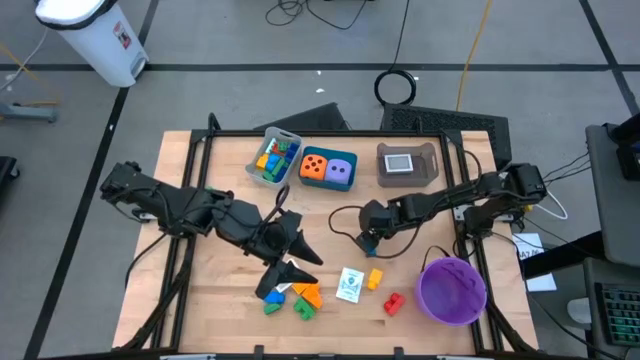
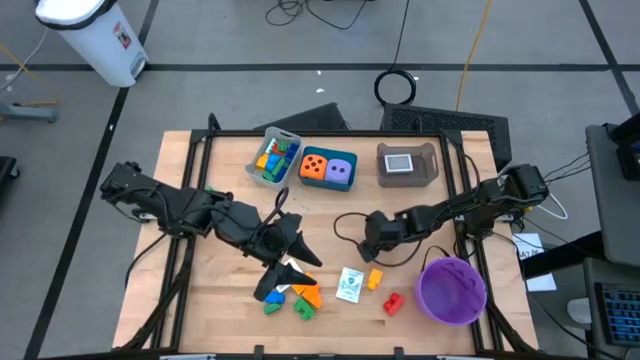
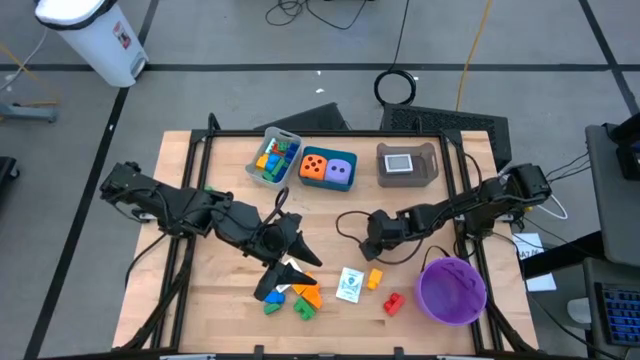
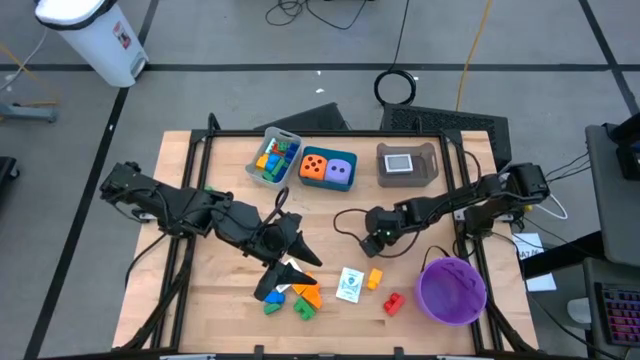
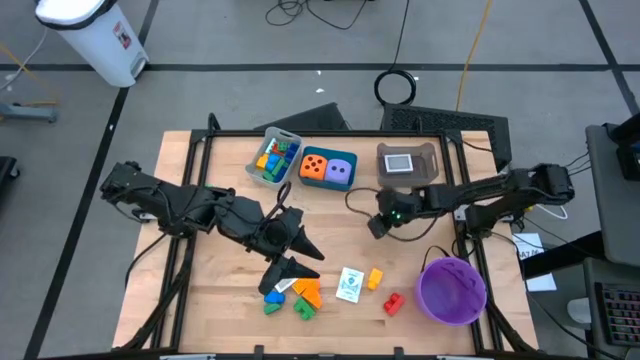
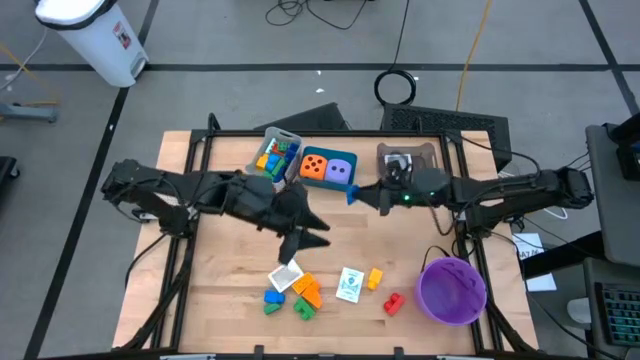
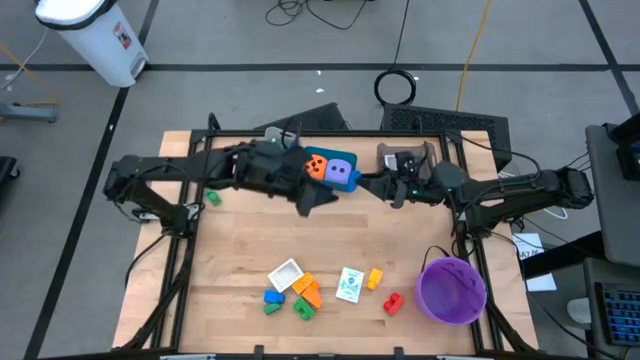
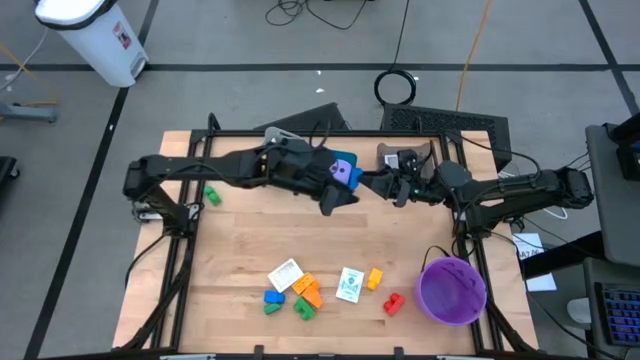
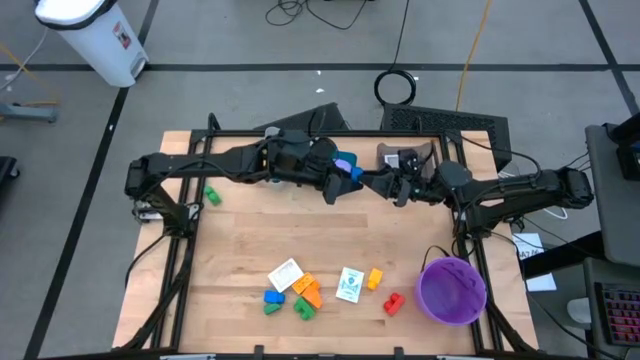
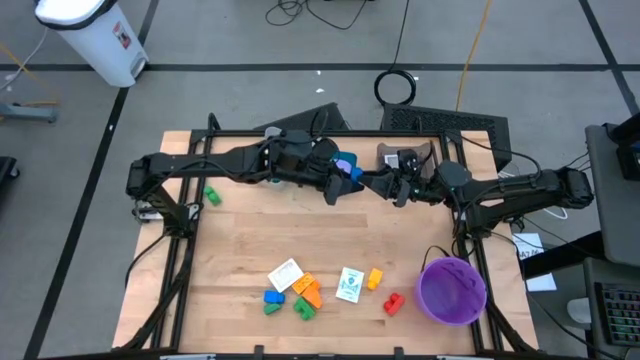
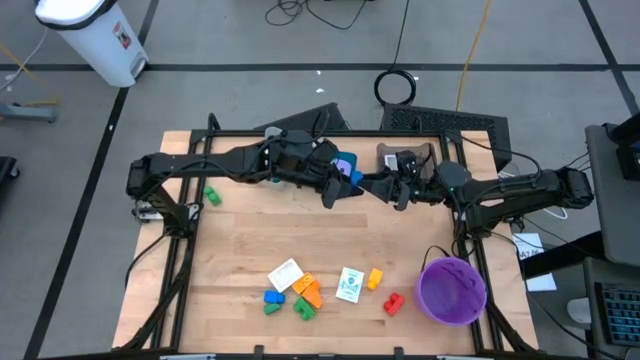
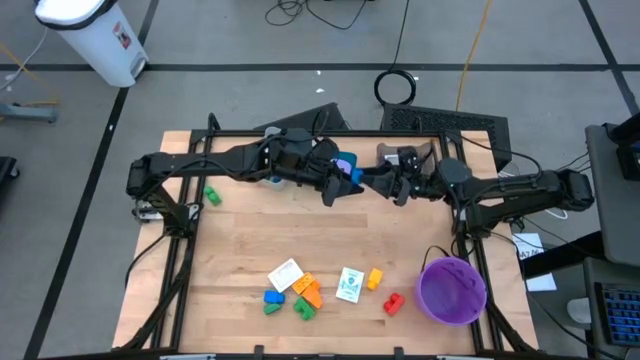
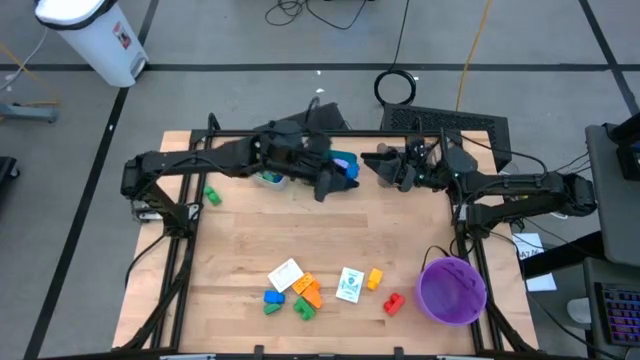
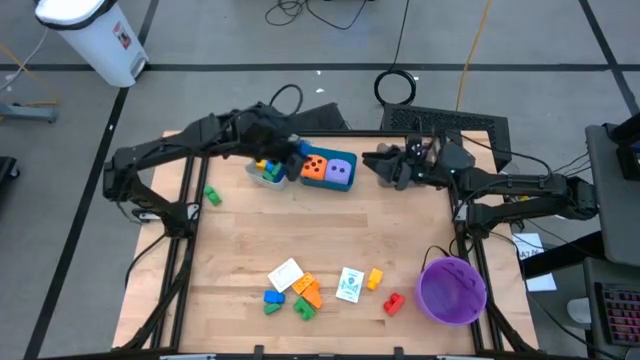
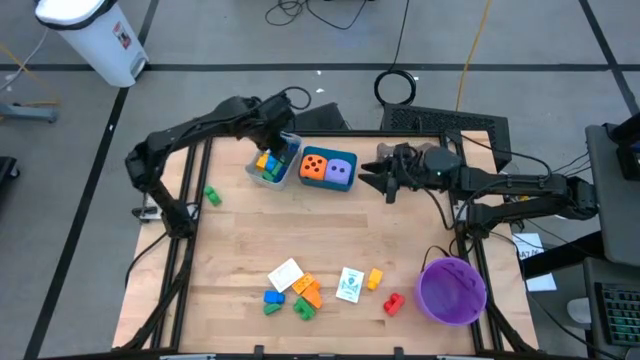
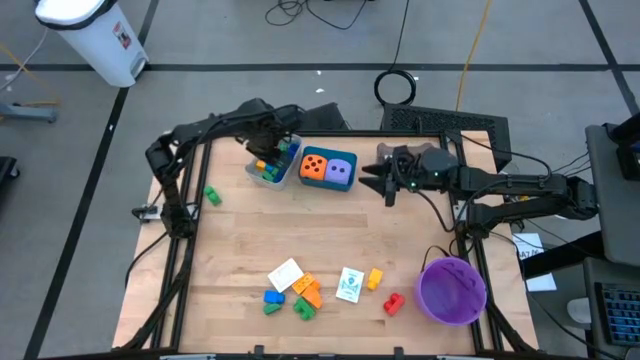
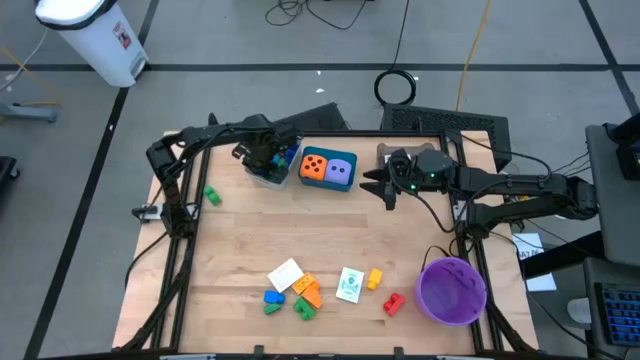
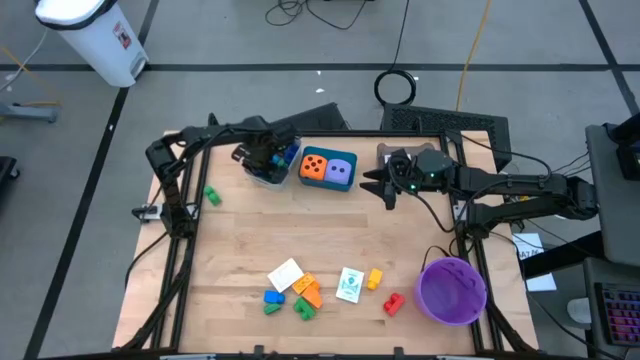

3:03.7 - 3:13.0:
Task: Pick & Place Toys
Put the blue game piece into the gray bin

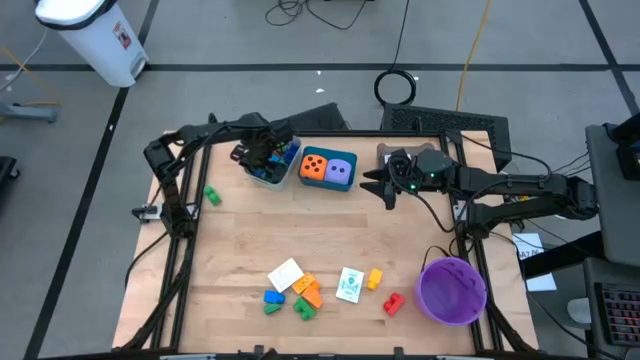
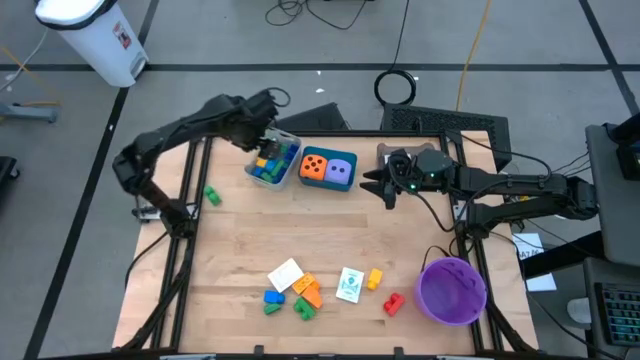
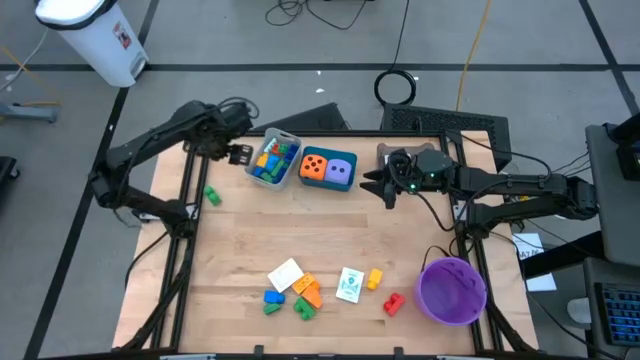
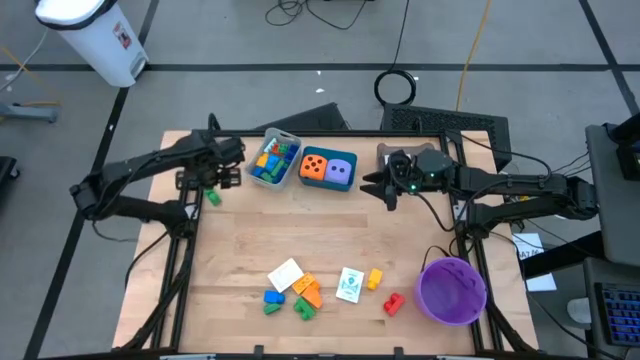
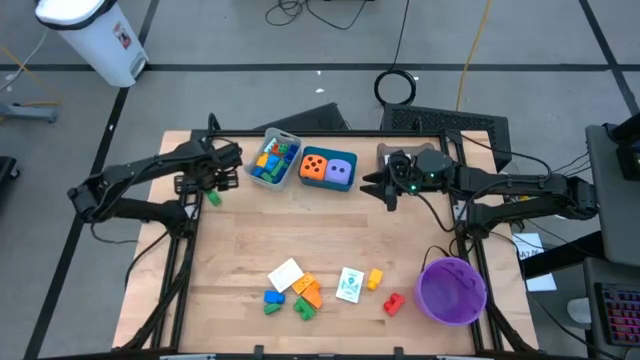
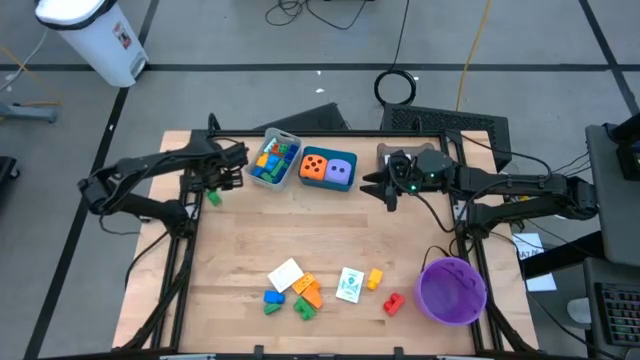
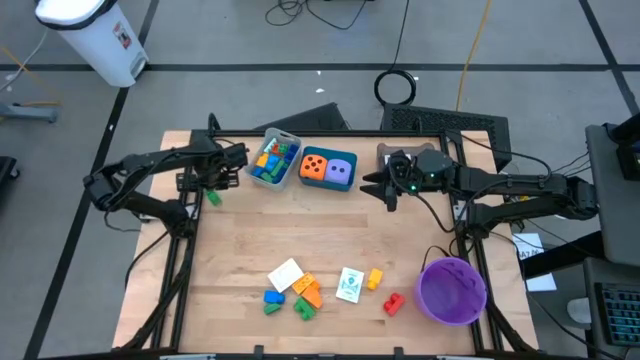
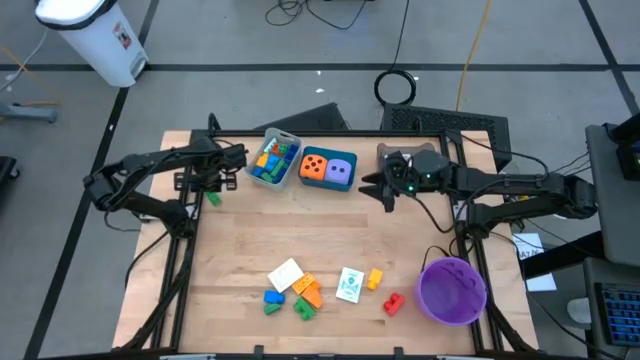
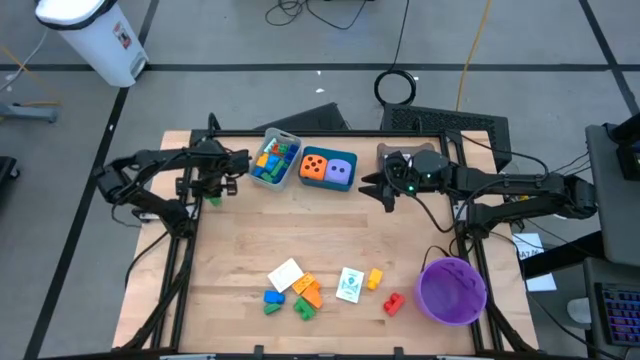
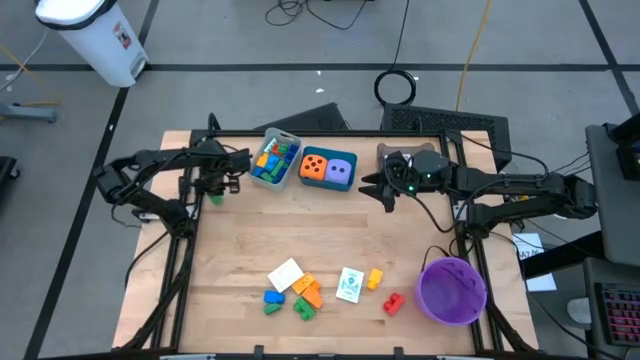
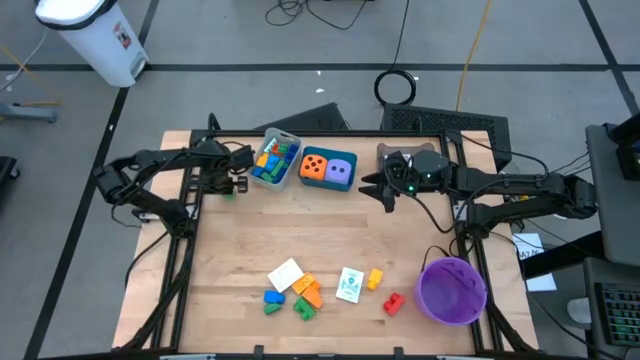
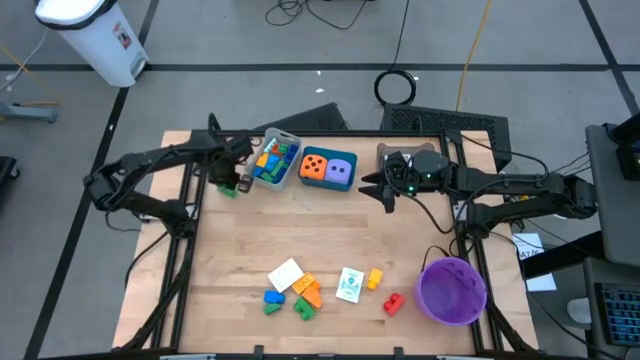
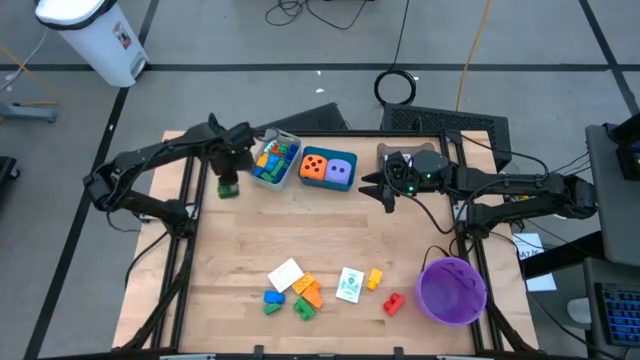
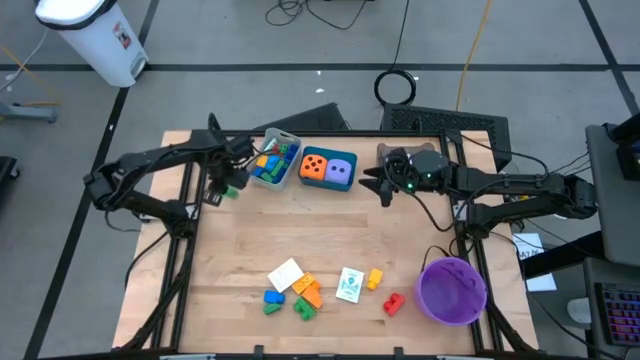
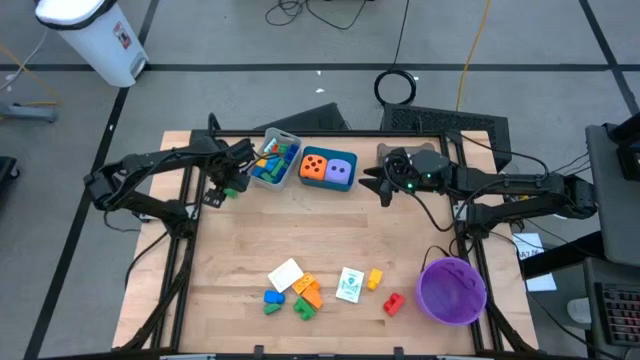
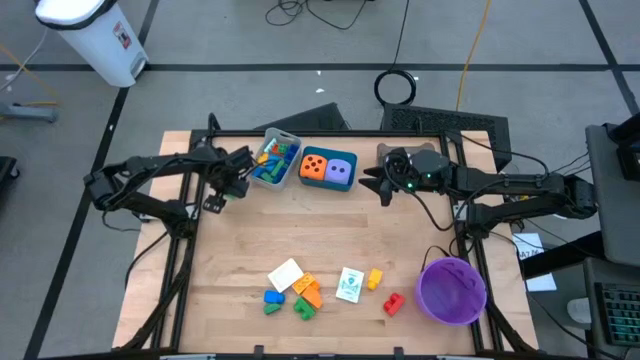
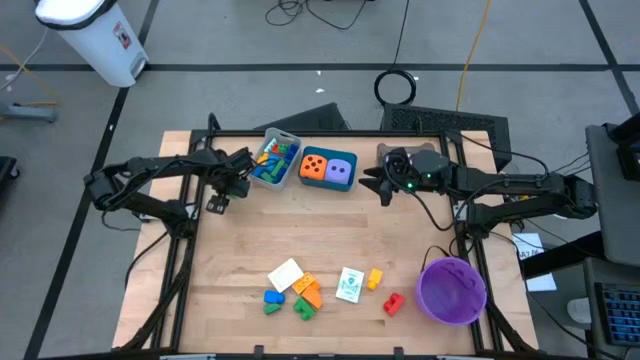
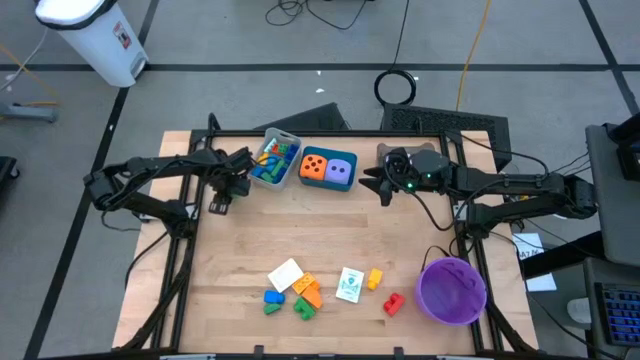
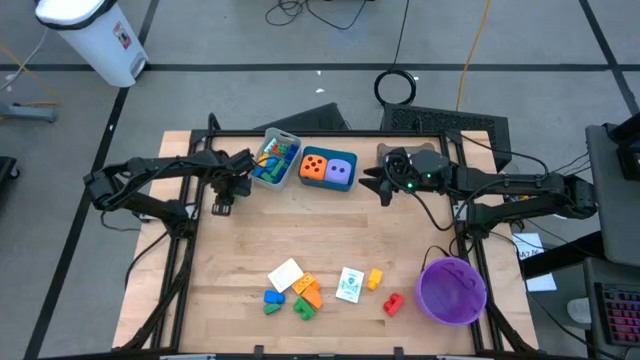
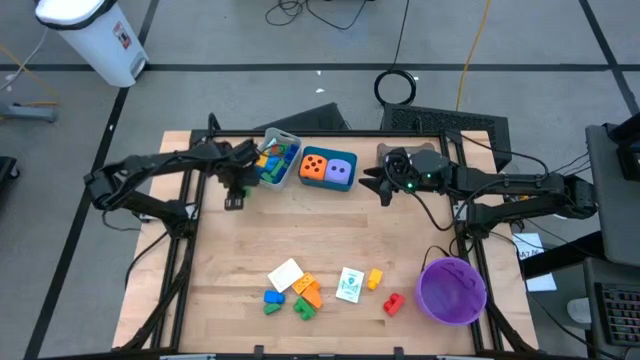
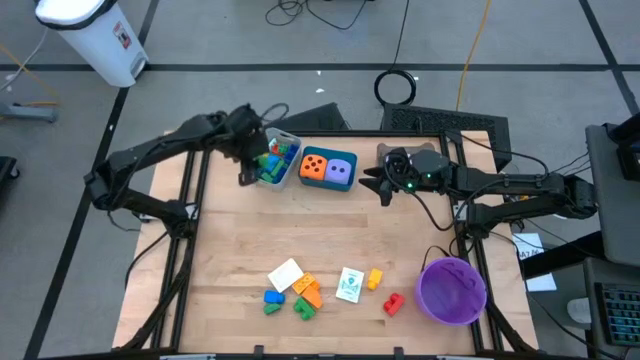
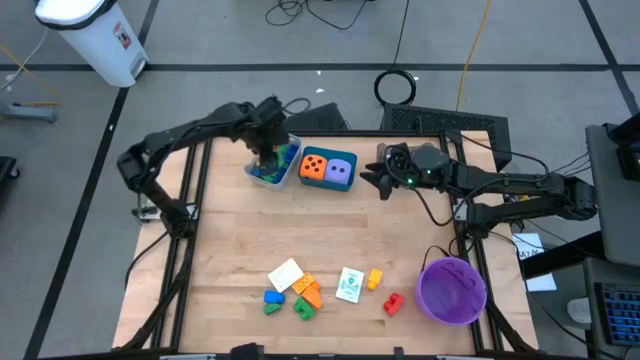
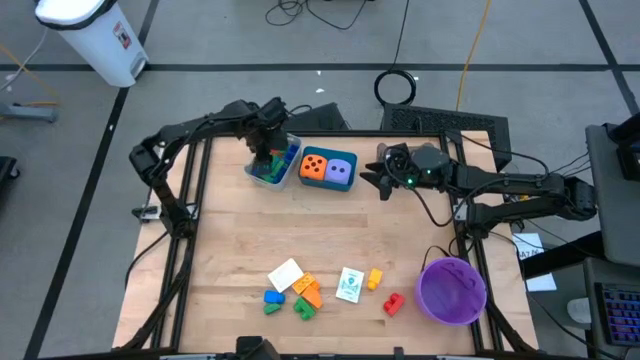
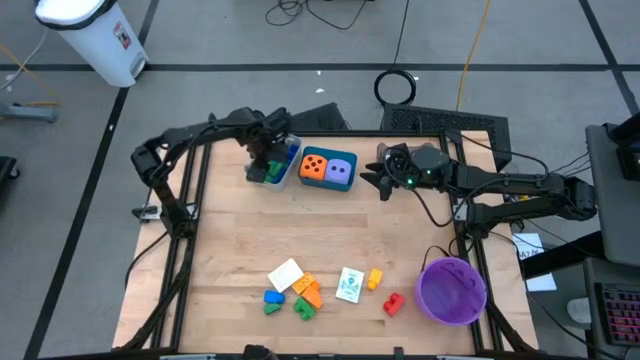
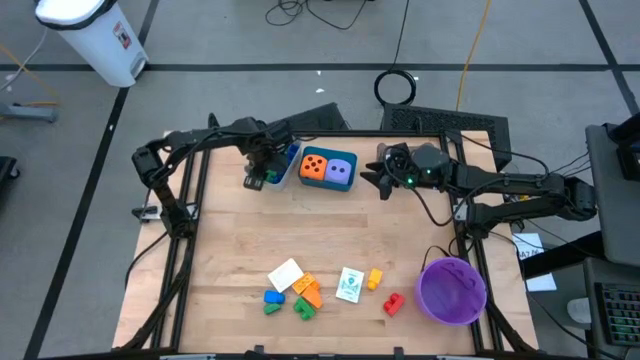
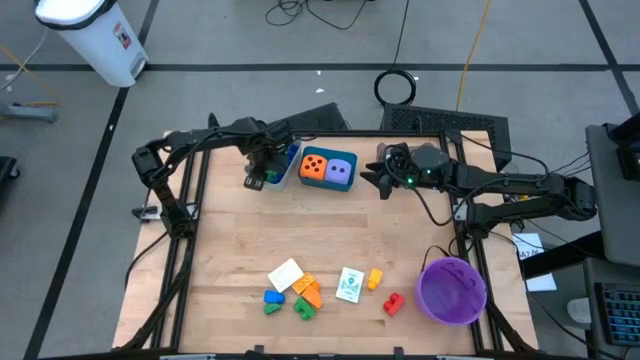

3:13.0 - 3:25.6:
Put the green game piece into the gray bin
